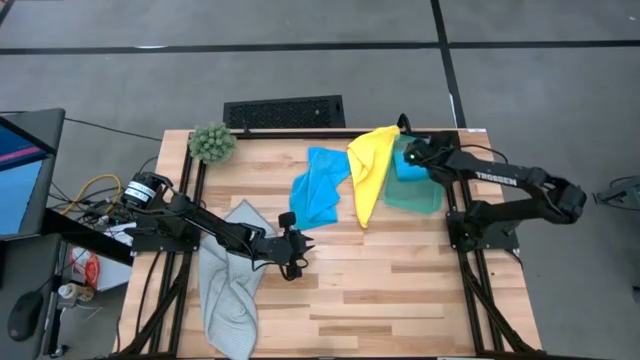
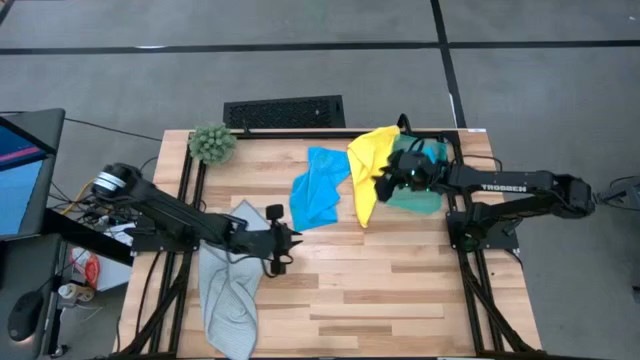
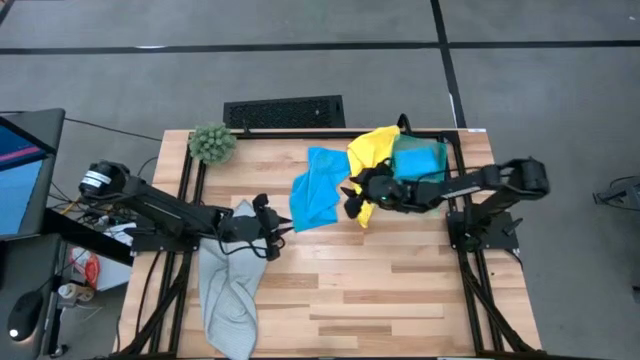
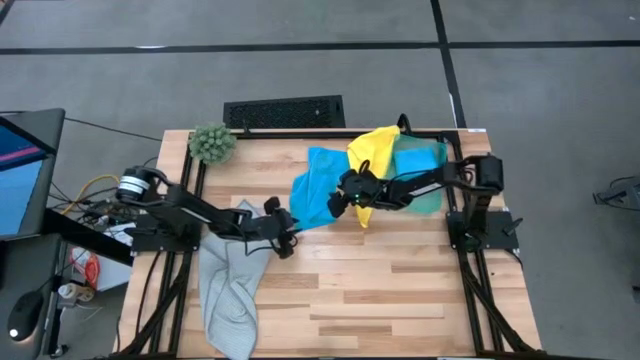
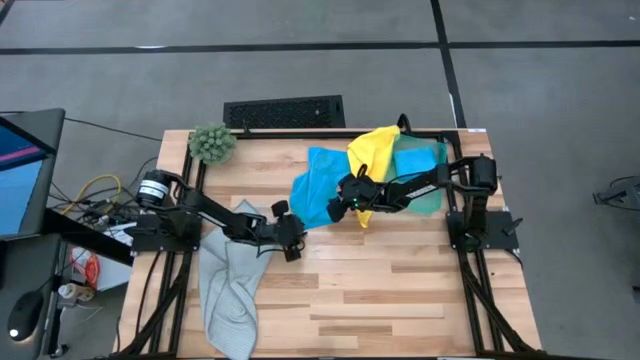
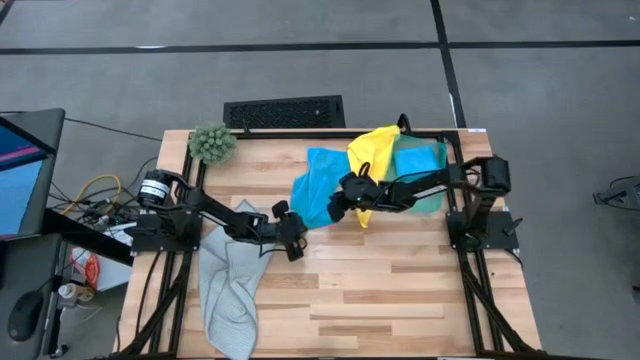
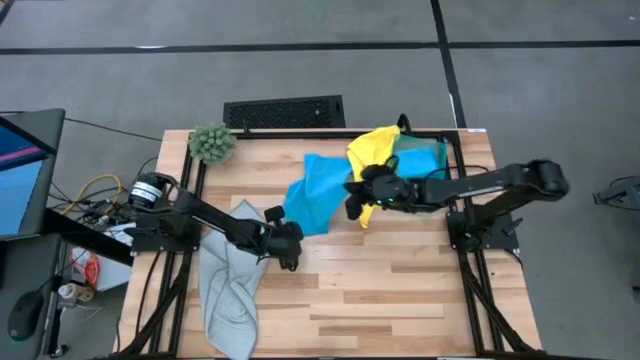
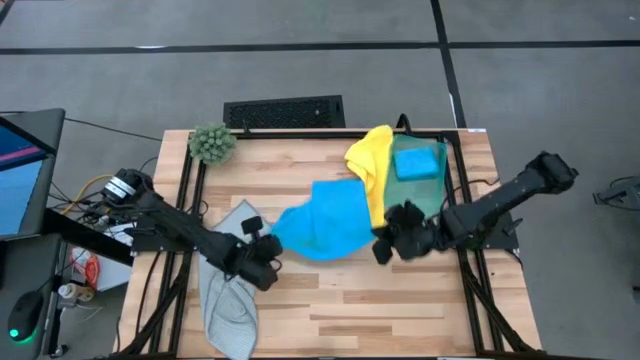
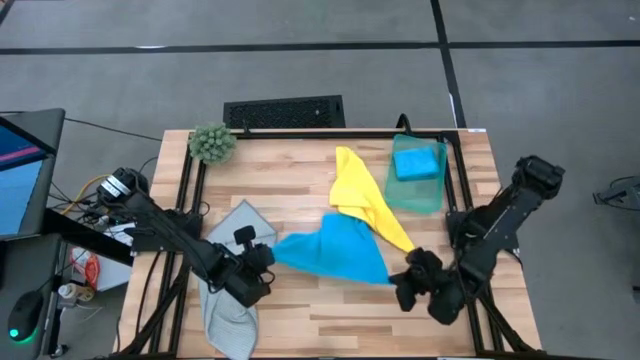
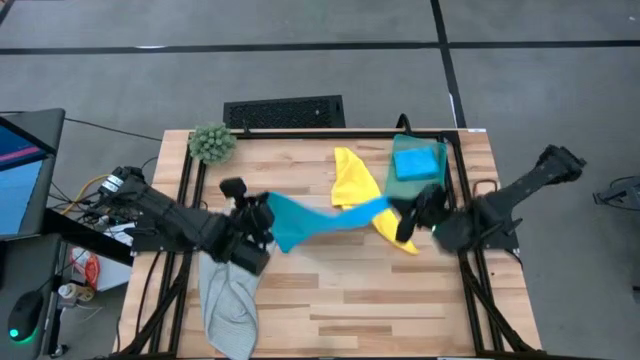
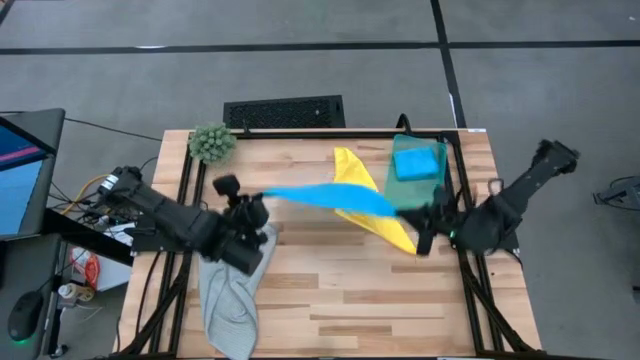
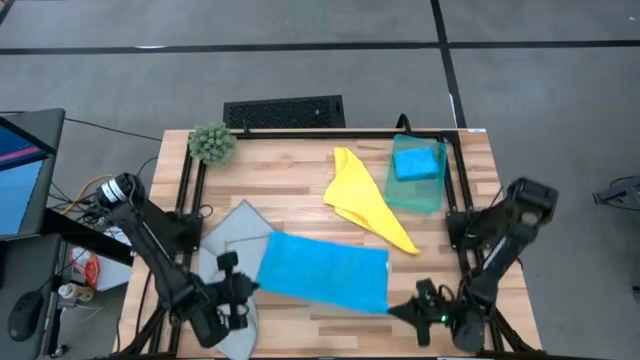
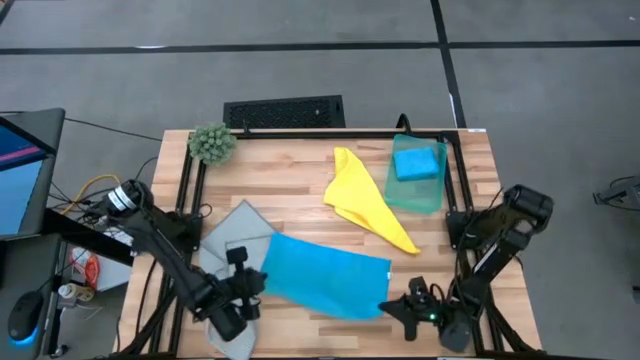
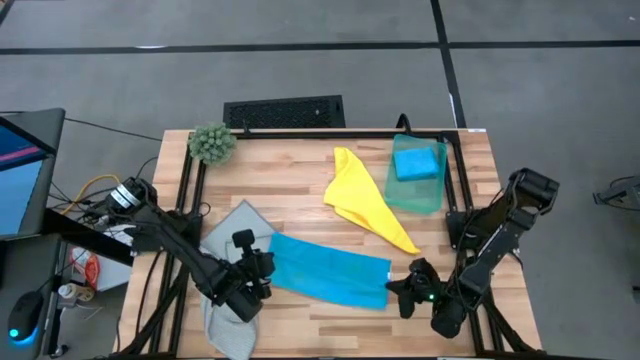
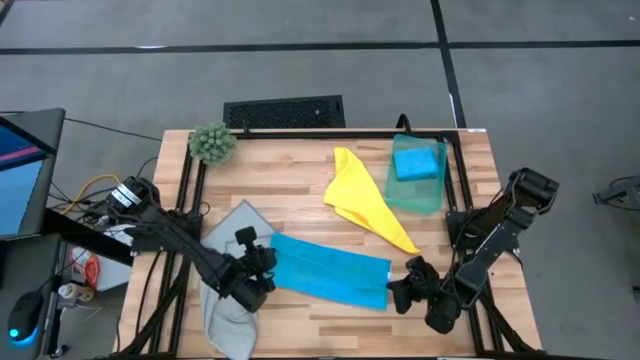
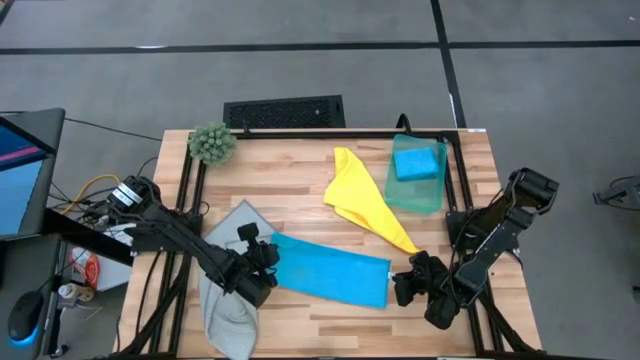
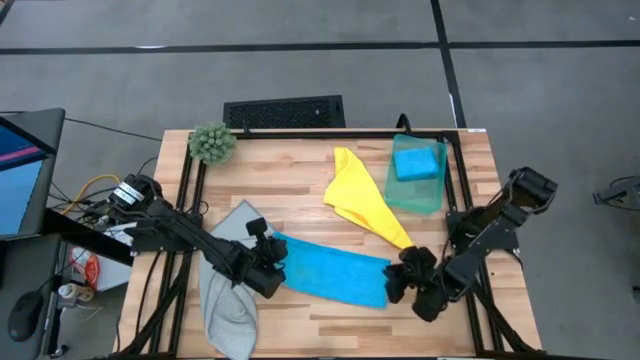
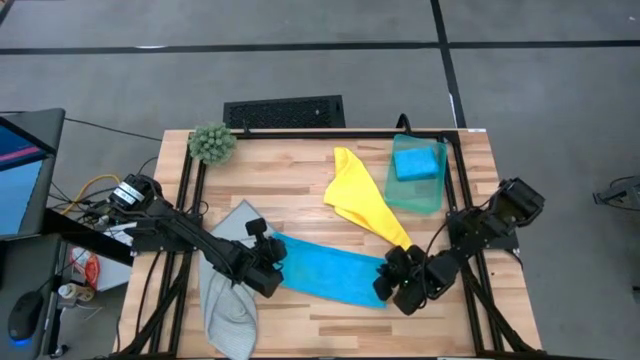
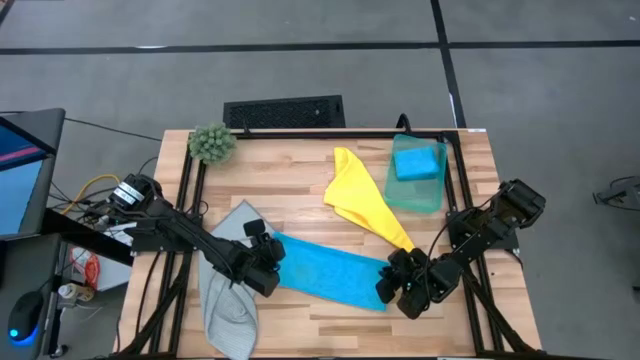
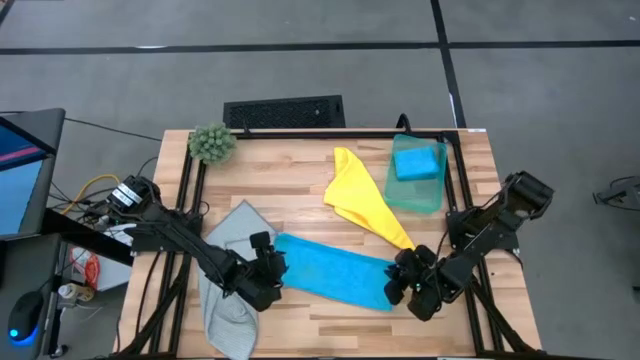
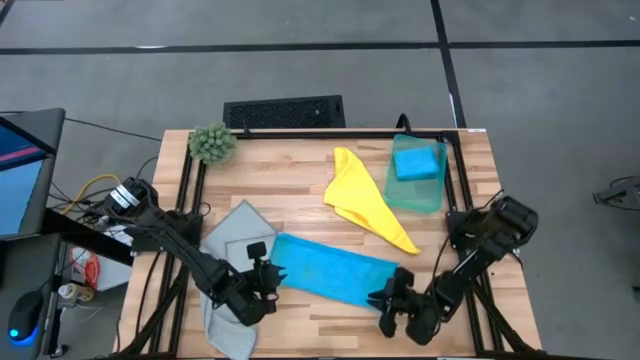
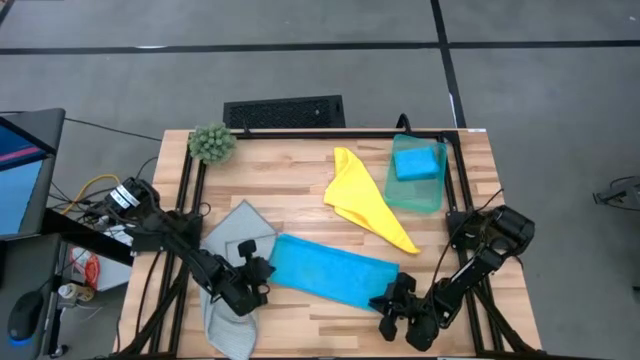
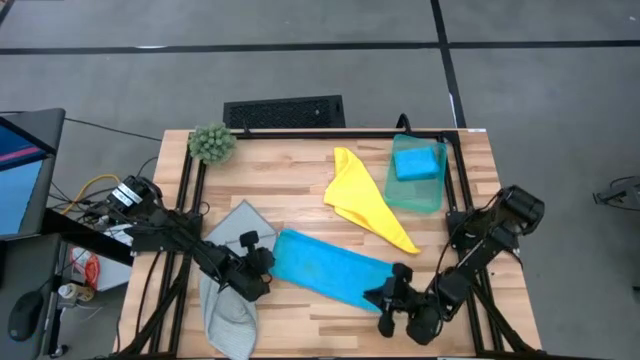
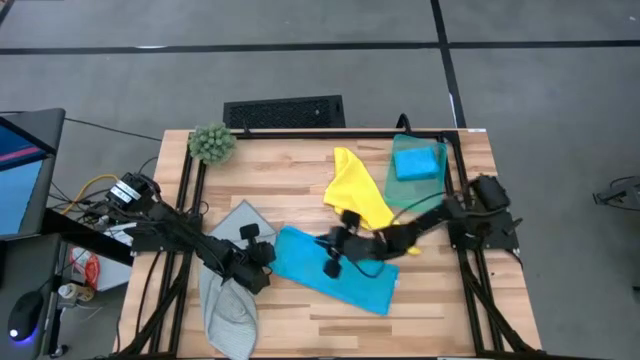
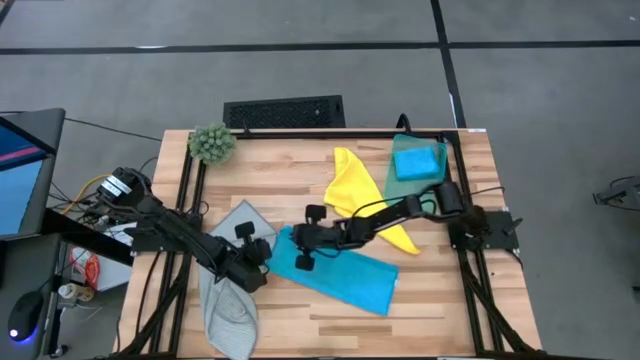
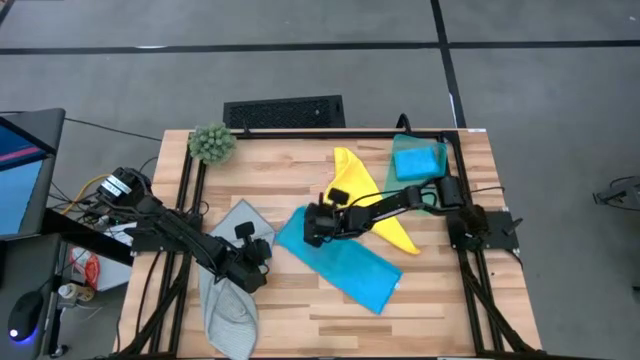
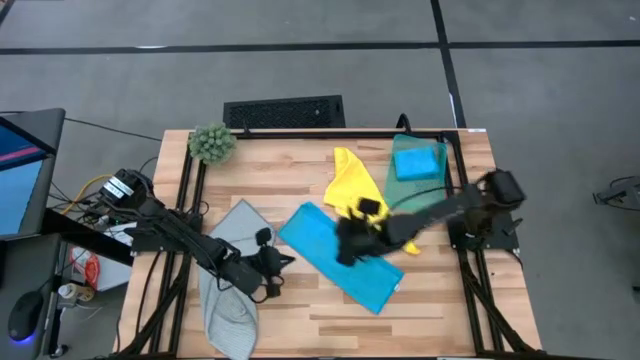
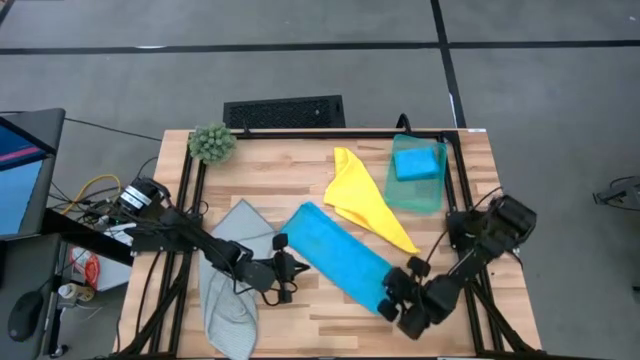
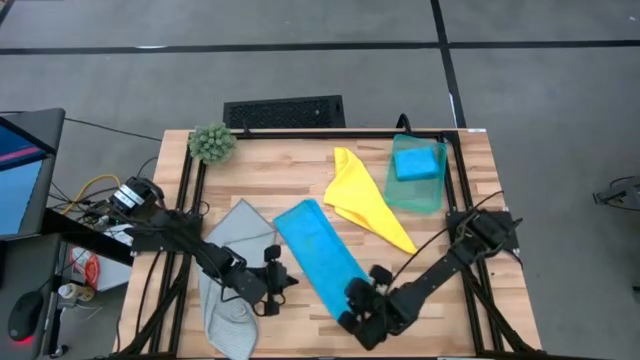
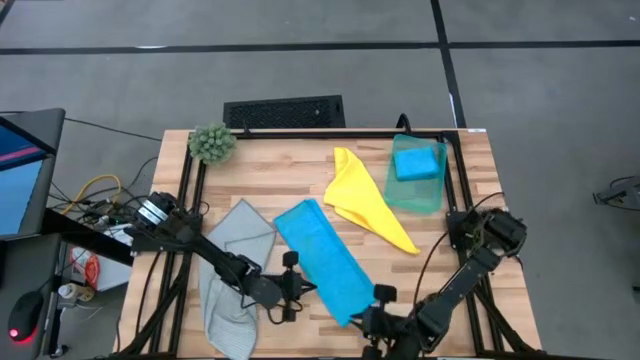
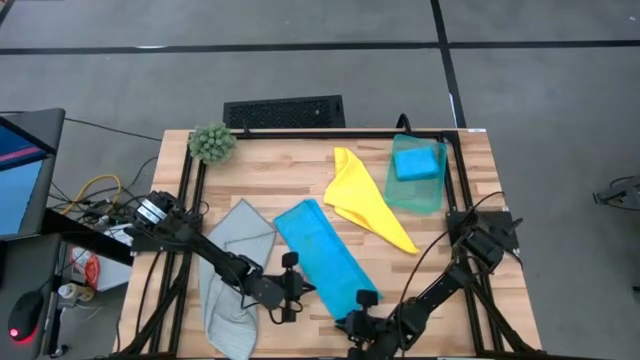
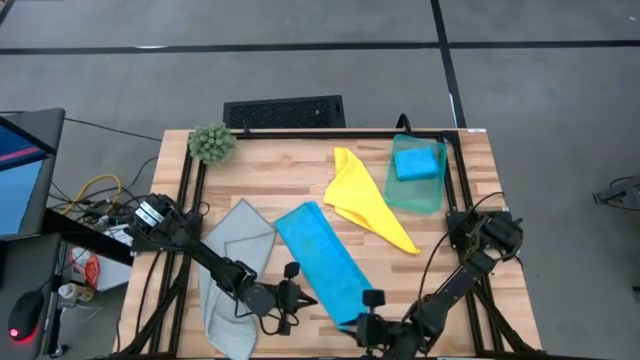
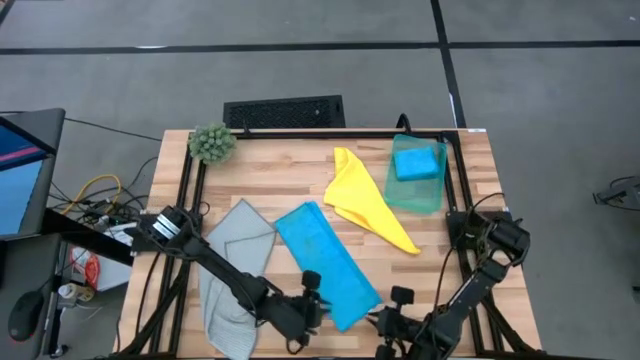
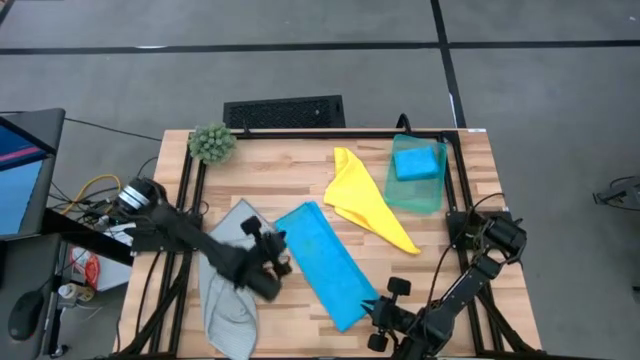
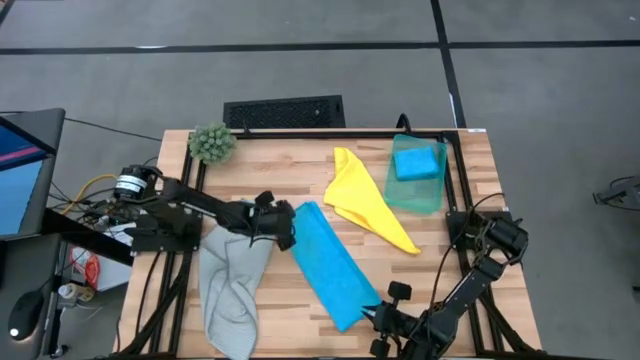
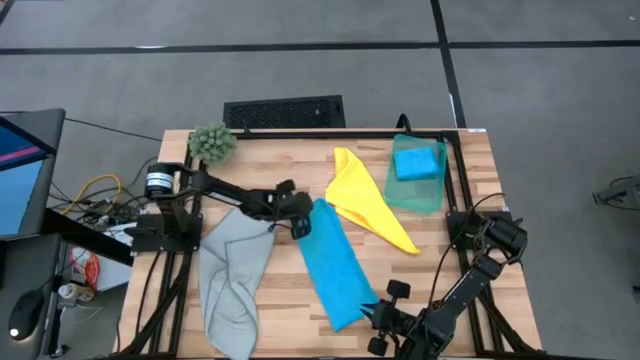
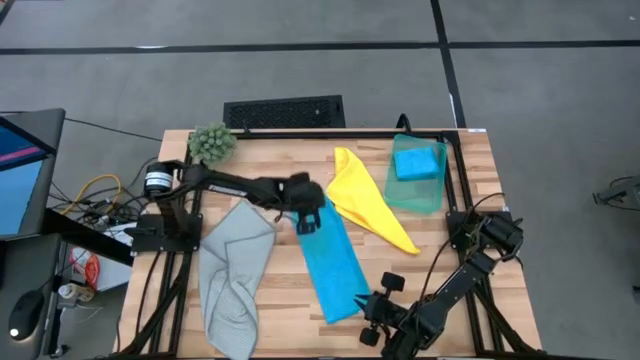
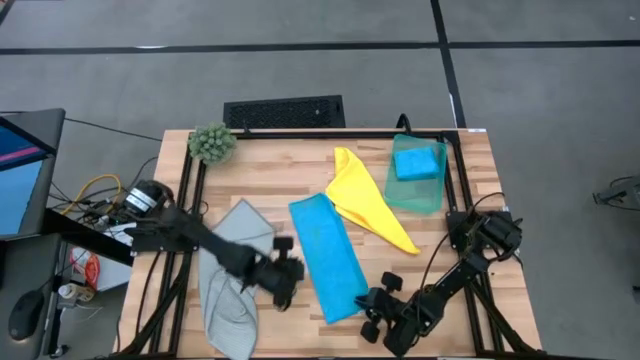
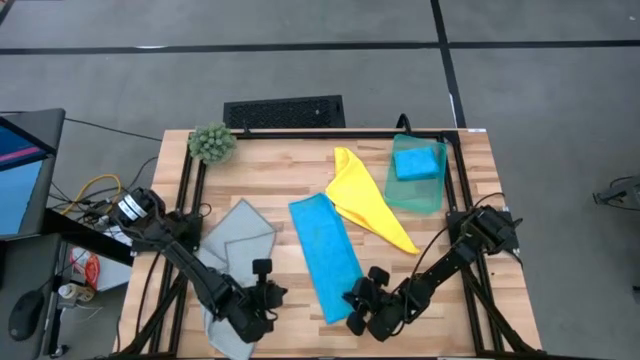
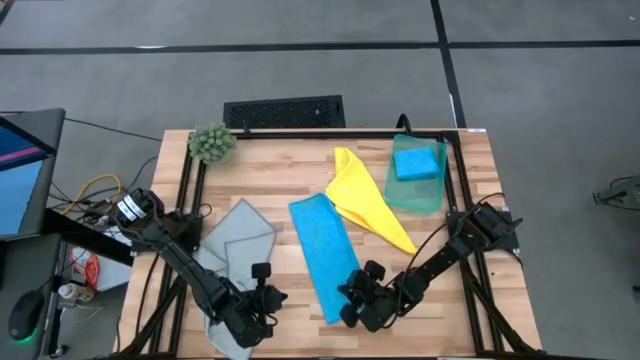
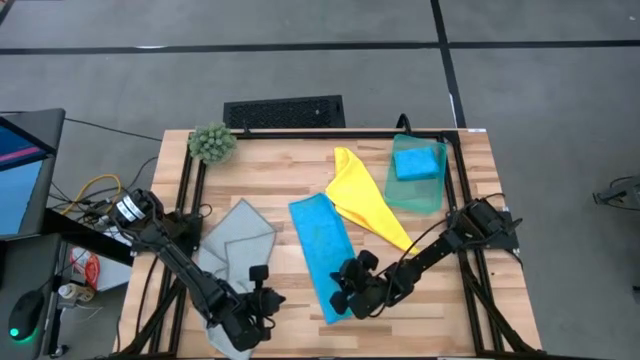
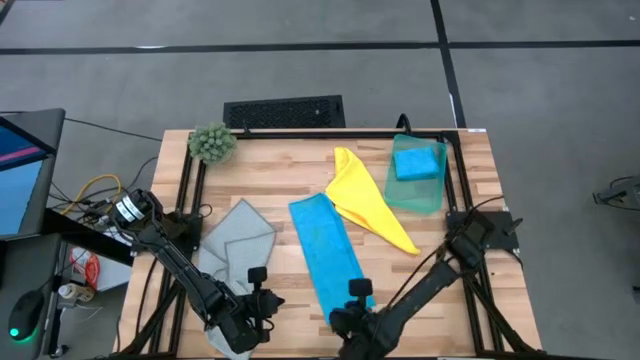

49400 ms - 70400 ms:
Task: Fold microfiber towels
Fold the blue microfiber cloth

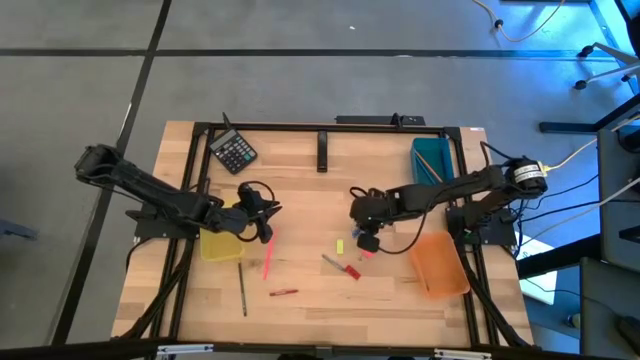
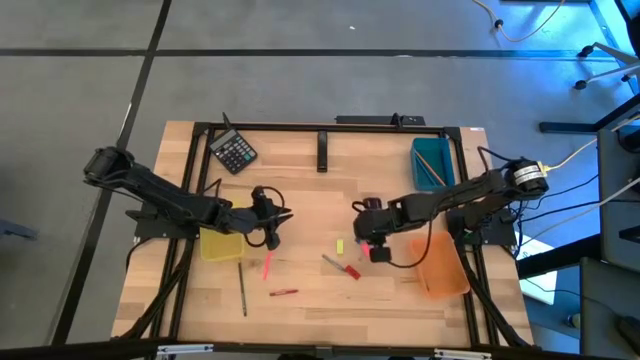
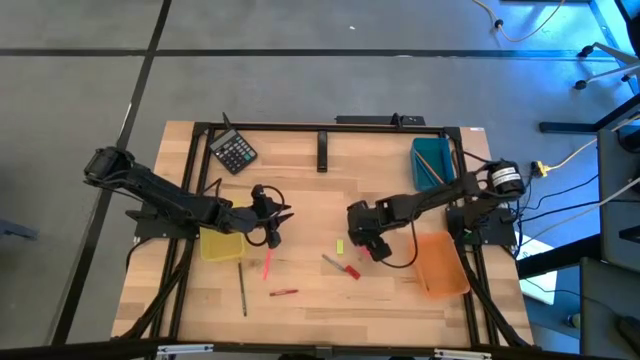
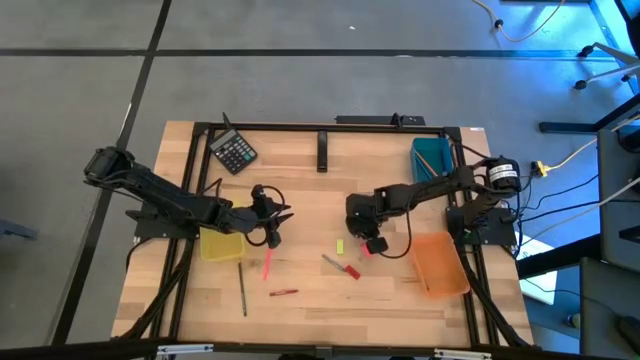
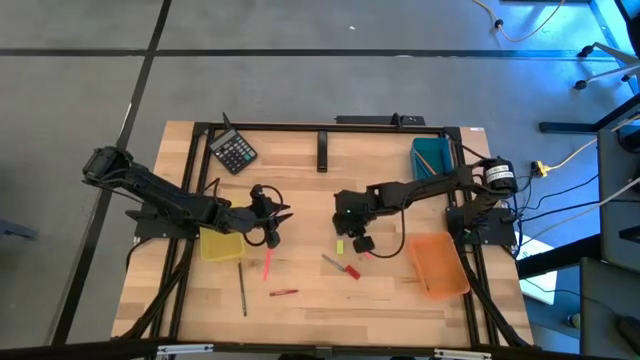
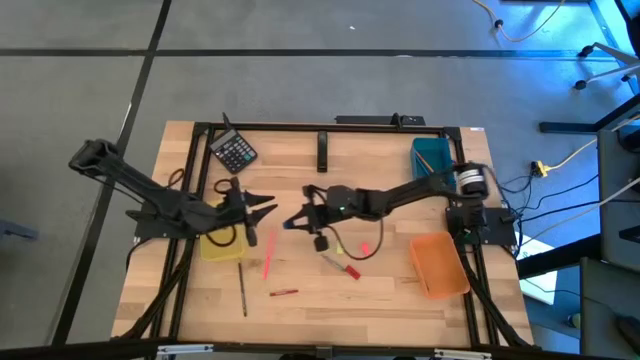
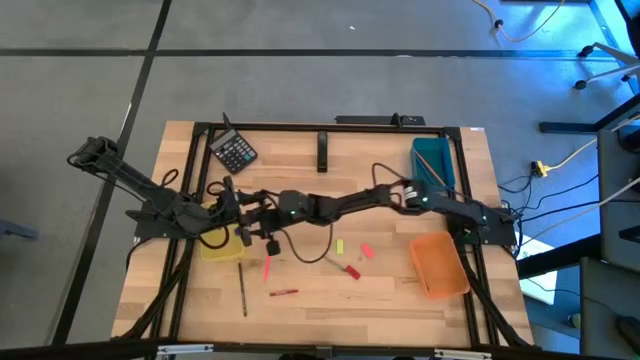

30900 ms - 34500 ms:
Task: Sort crayons/erasers/pens/pencils in bins
Put the blue eraser into the yellow bin
